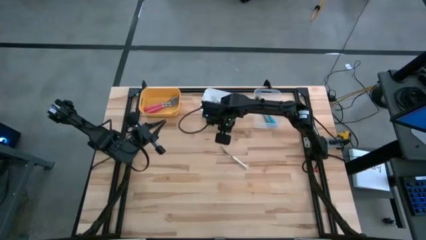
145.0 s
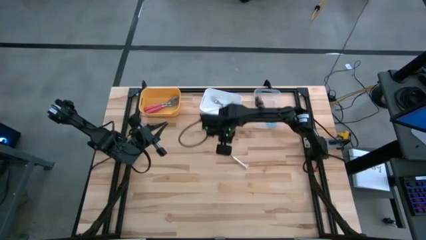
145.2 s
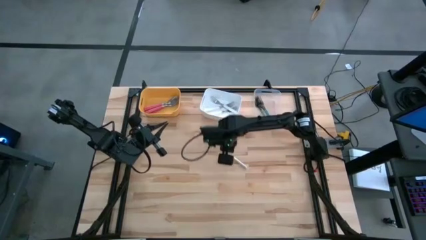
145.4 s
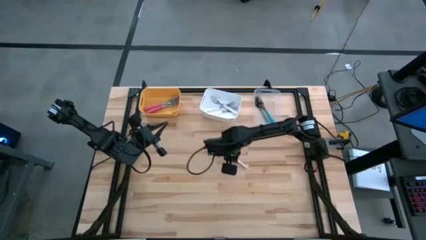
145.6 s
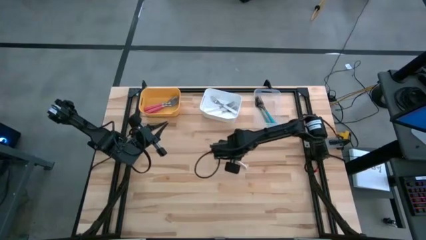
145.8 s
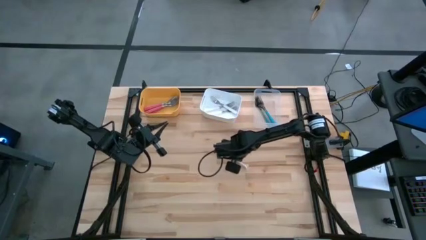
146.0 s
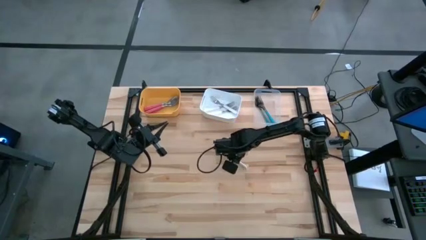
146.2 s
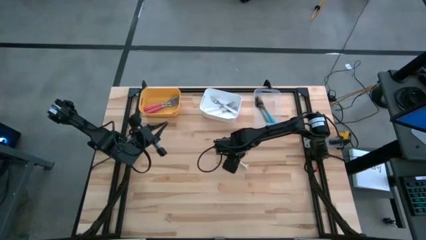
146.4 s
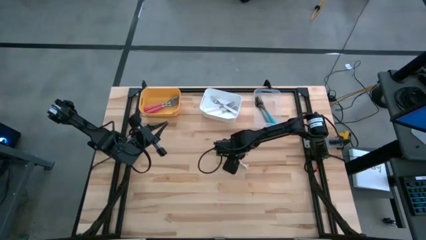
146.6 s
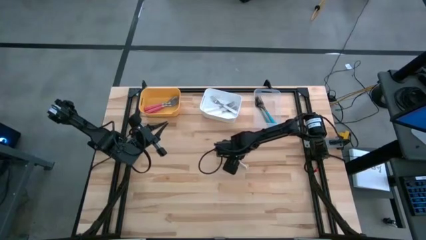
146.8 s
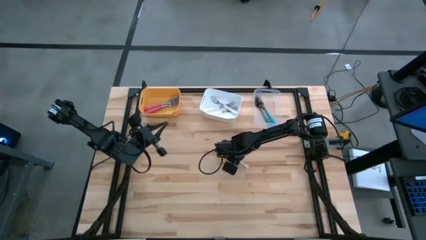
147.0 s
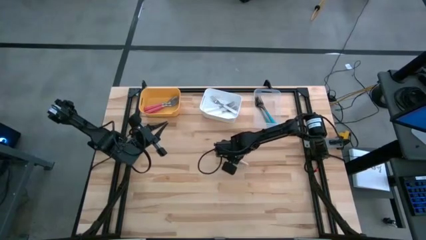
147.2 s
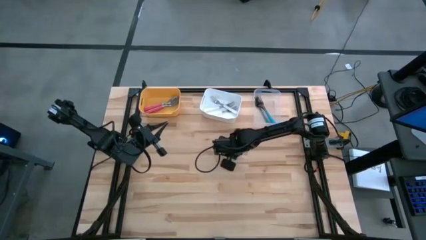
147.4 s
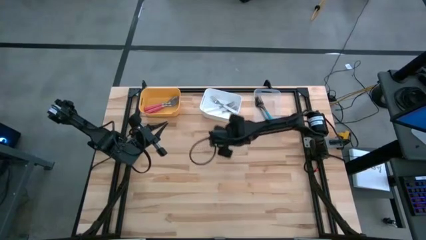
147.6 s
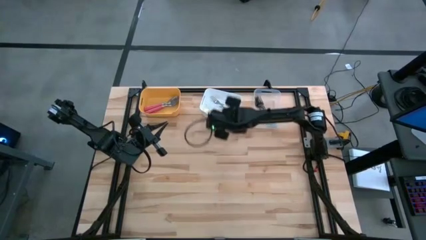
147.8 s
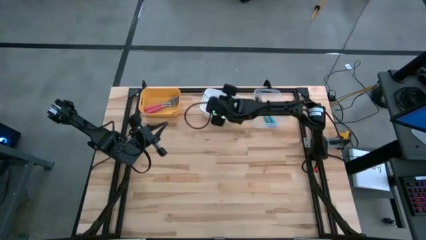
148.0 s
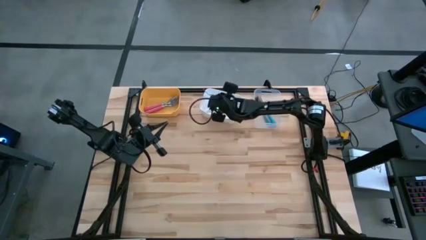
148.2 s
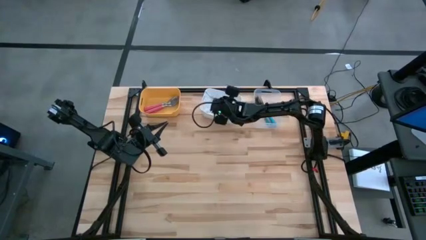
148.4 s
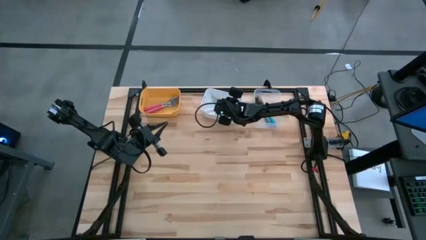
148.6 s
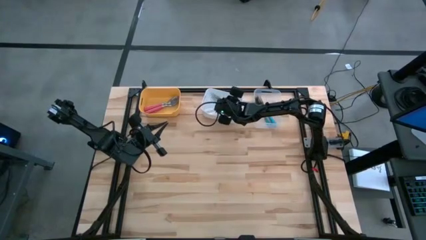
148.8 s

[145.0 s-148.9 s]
Task: Sort silverware by color (type)
Put the white fork into the white bin

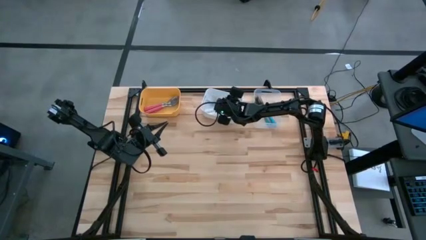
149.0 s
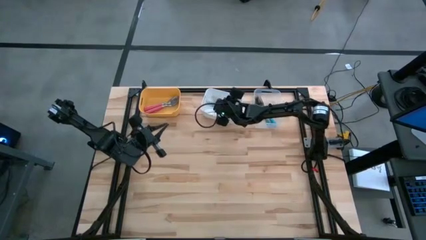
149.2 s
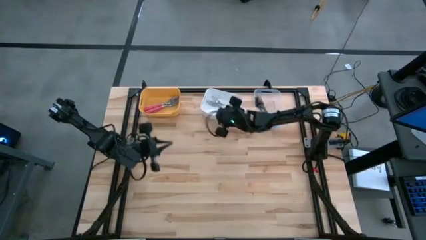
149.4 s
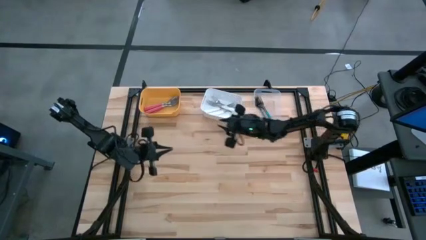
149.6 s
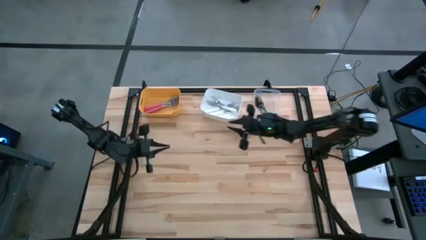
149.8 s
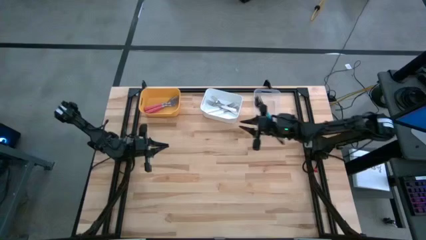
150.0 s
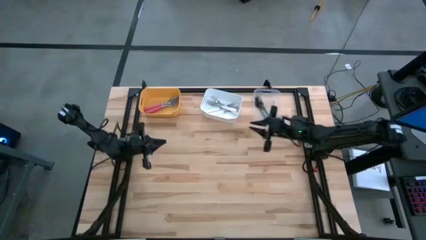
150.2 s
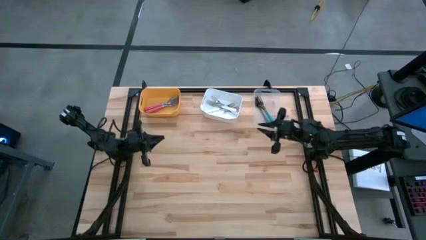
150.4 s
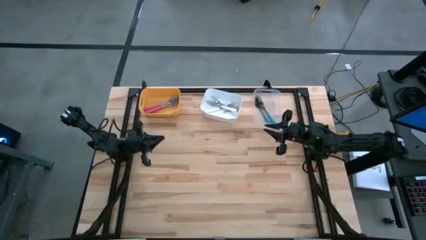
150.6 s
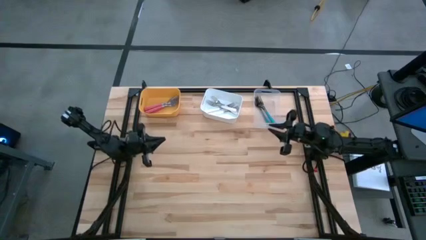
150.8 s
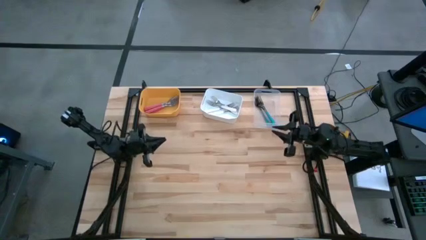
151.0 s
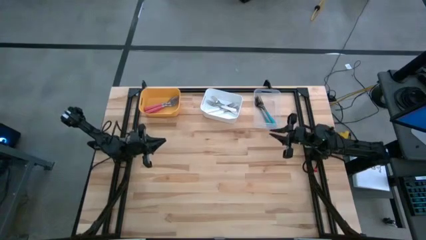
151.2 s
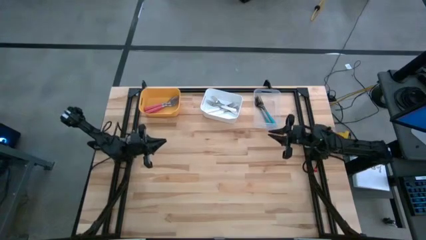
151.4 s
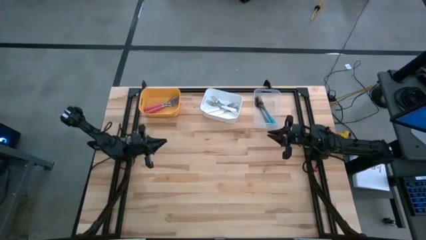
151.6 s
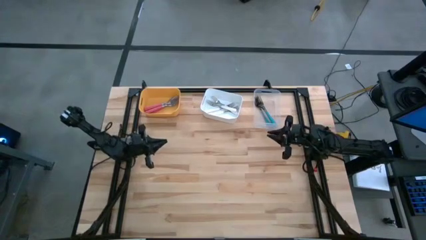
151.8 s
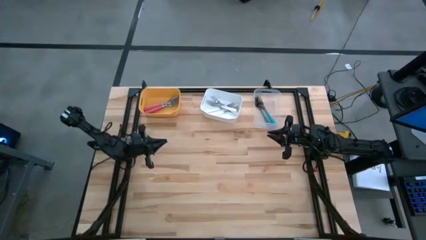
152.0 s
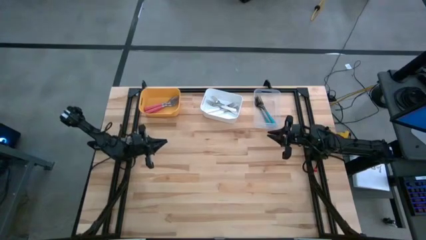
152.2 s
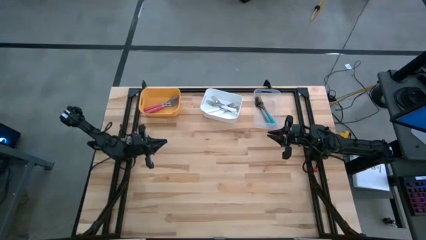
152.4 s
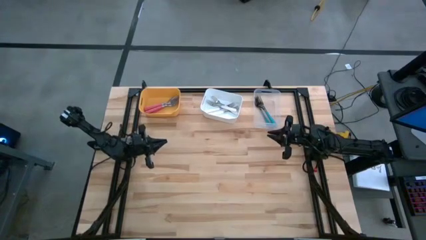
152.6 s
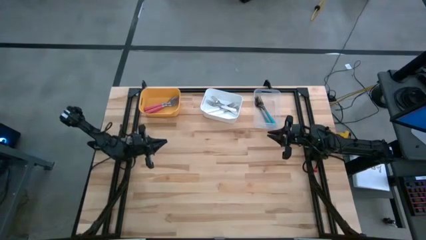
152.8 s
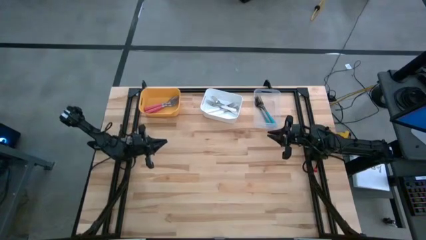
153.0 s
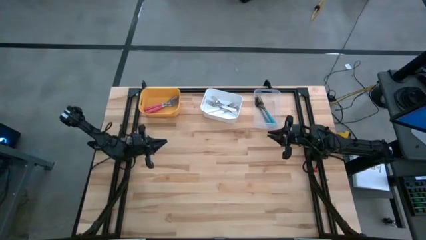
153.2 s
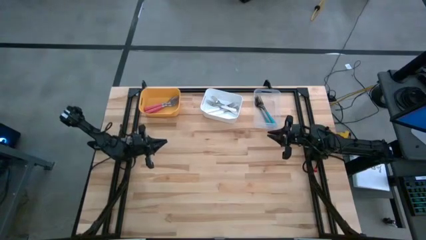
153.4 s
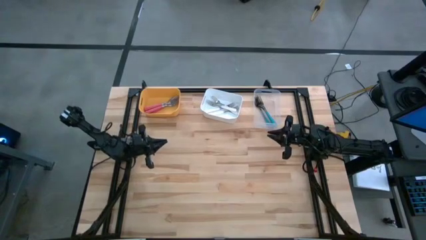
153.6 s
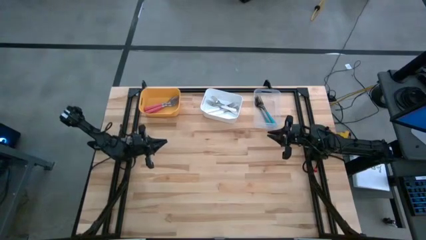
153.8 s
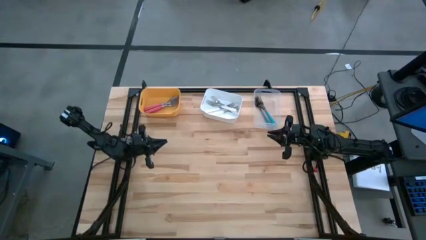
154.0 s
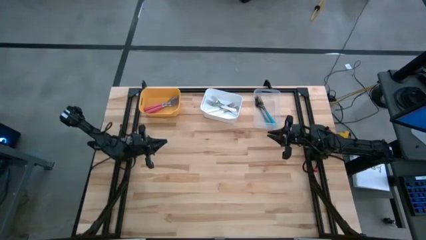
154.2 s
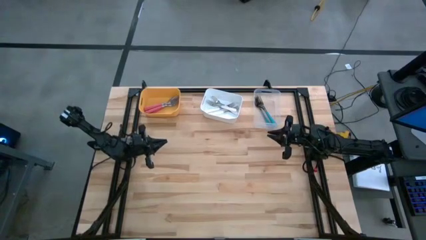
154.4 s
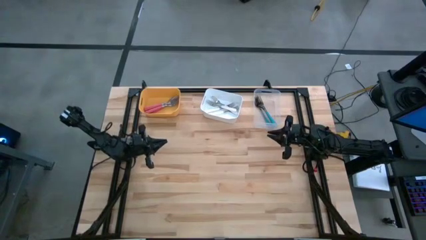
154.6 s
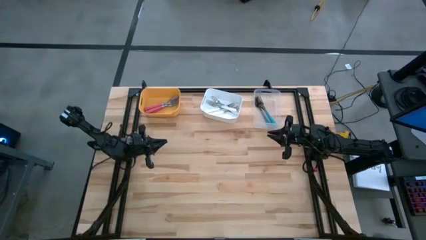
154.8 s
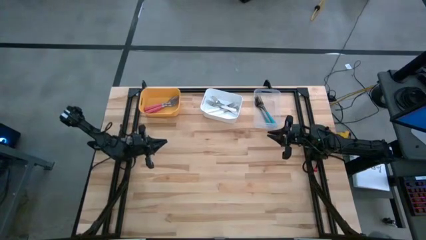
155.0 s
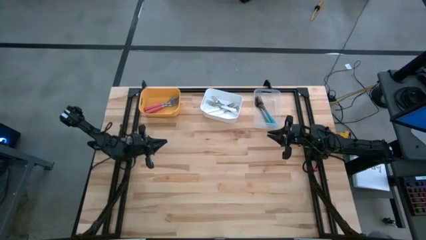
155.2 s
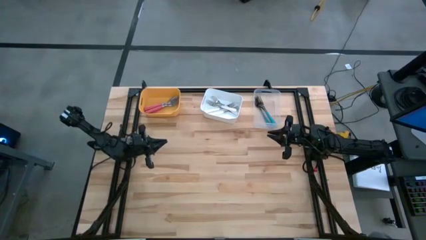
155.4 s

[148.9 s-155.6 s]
Return to Home Position

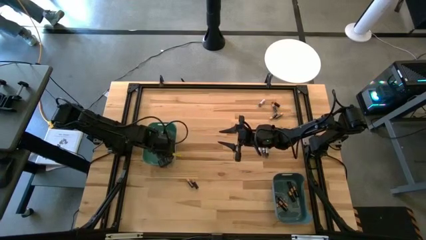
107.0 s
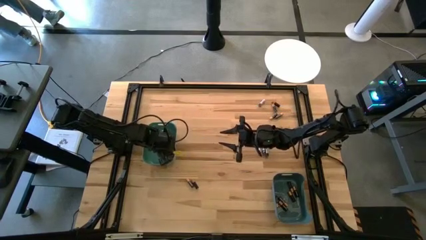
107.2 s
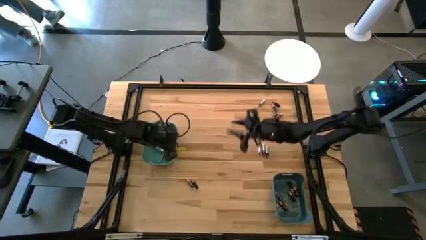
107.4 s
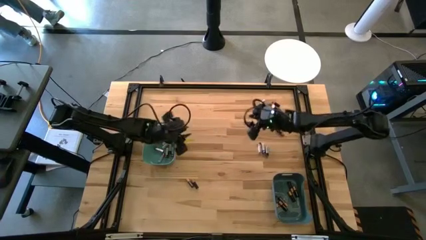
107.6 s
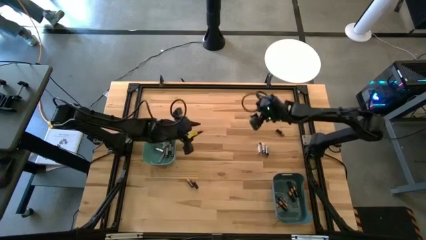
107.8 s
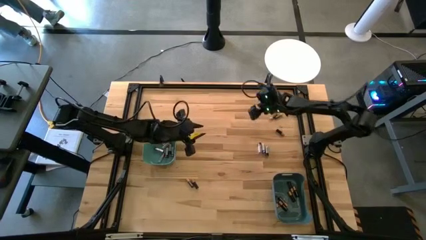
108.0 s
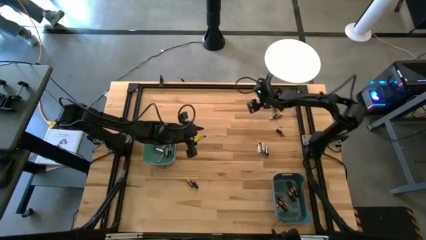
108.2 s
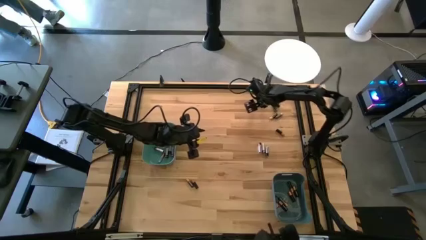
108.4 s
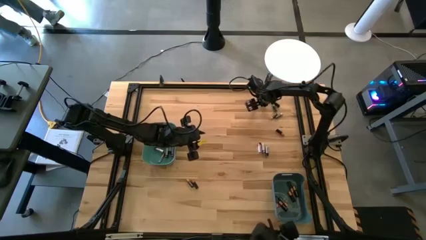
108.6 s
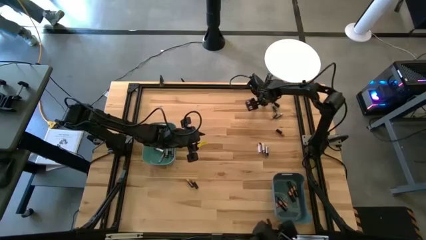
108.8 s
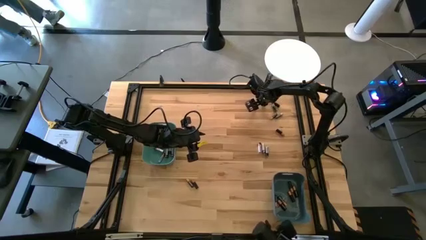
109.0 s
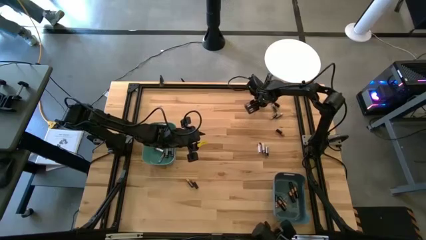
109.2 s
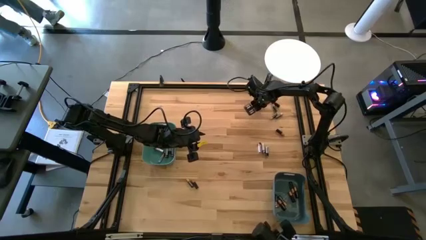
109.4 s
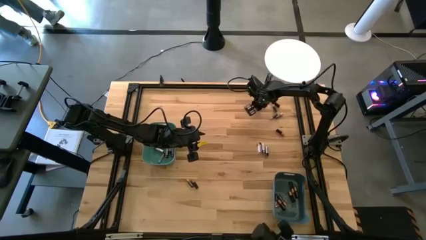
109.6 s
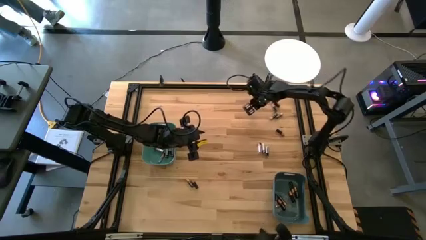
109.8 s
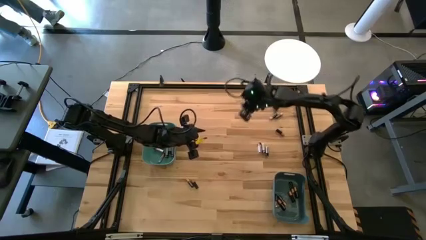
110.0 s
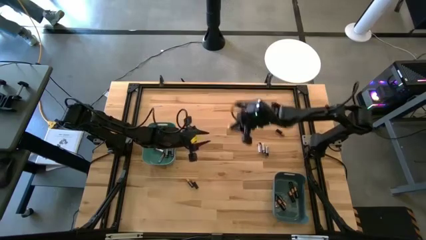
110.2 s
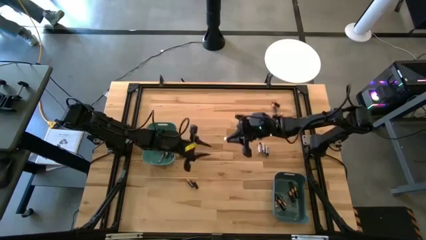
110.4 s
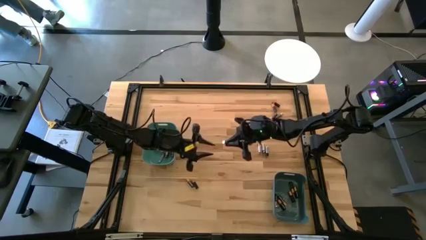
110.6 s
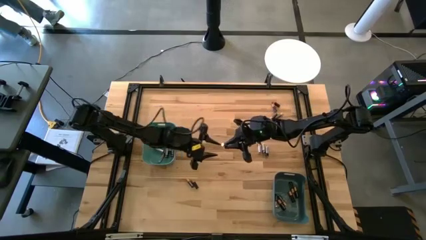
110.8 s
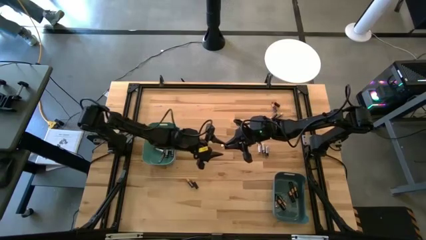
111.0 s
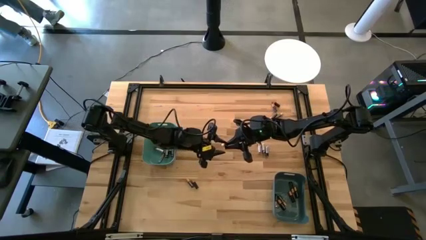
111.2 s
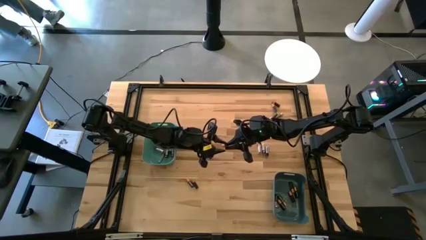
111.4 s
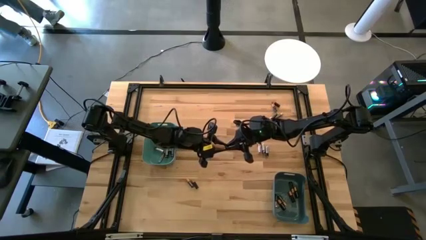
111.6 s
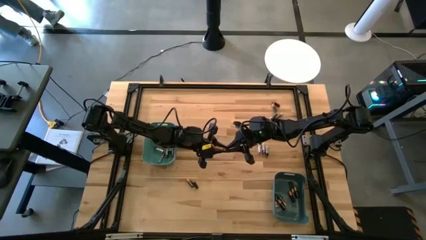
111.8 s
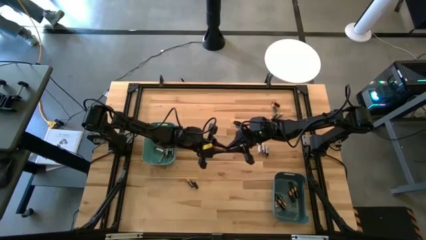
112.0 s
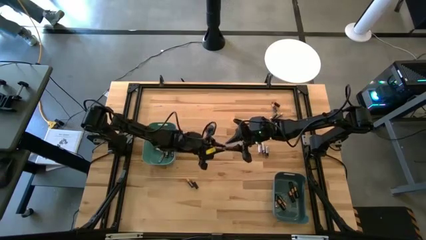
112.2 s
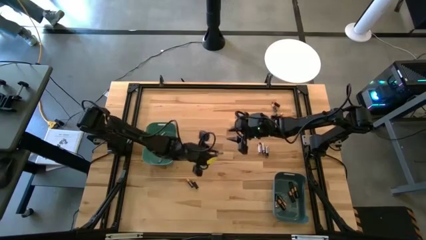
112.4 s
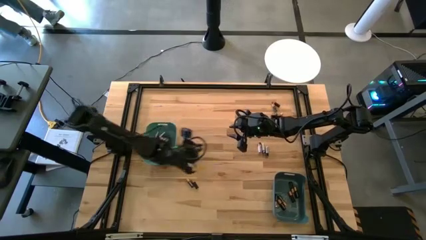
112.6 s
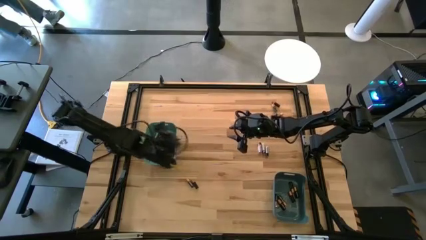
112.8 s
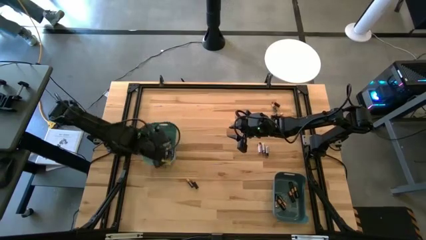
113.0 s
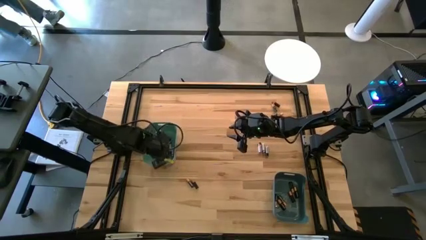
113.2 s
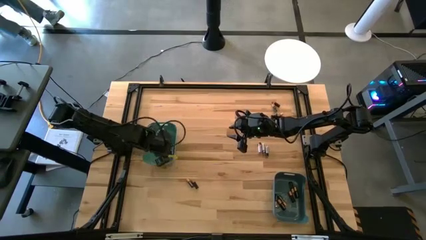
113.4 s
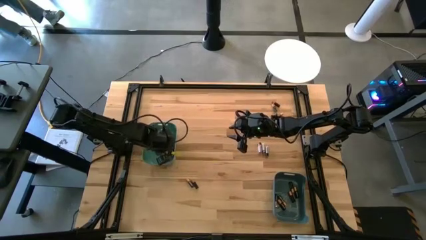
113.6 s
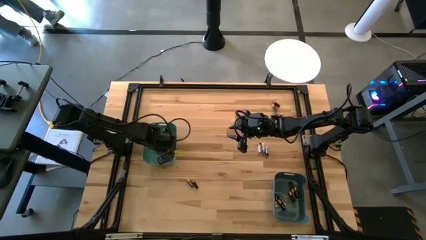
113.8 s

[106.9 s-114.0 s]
Task: Sort batteries
Put the silver battery into the green bin
